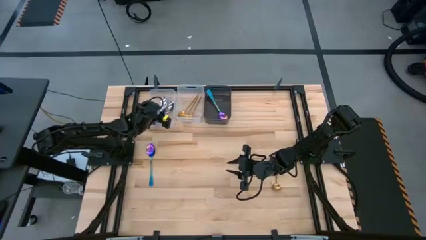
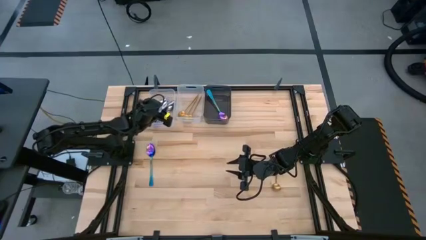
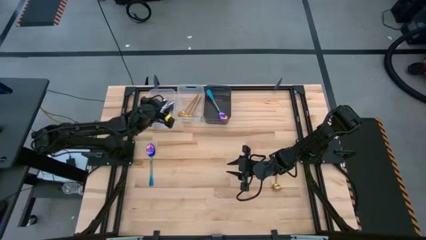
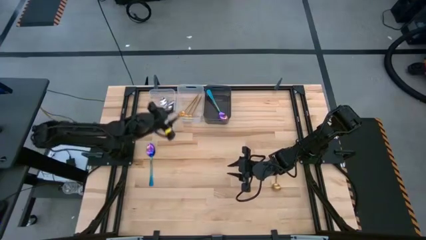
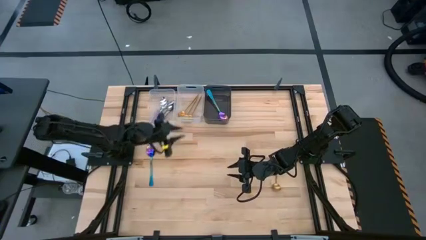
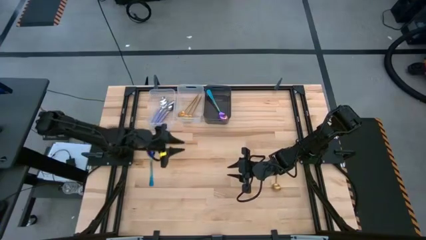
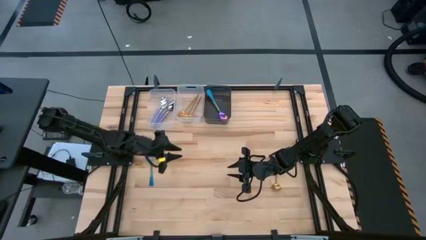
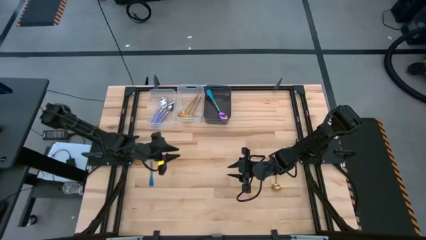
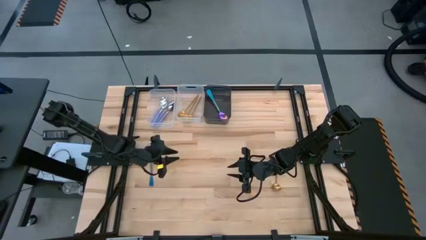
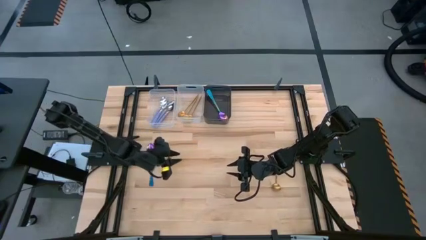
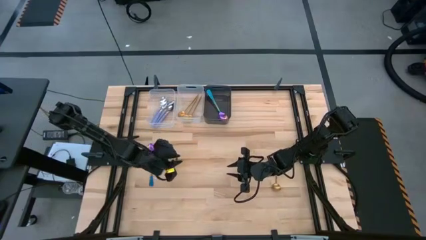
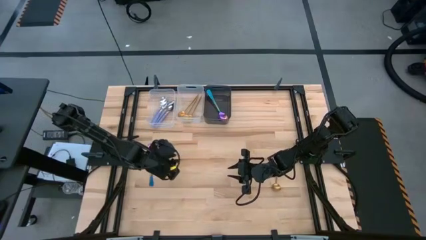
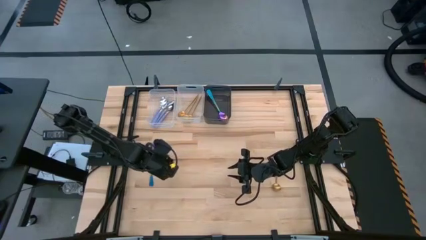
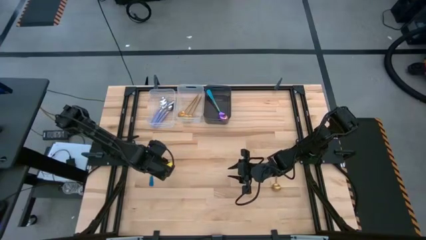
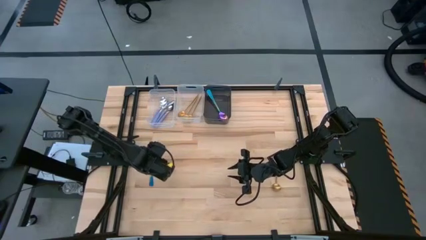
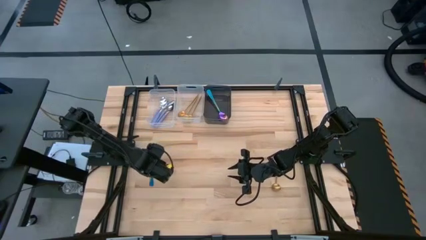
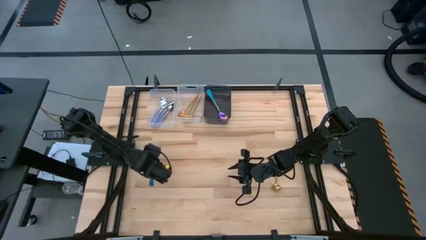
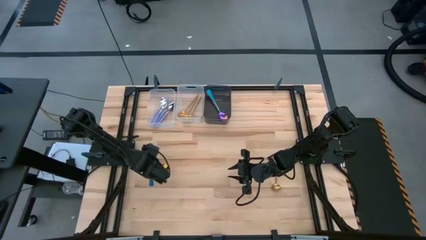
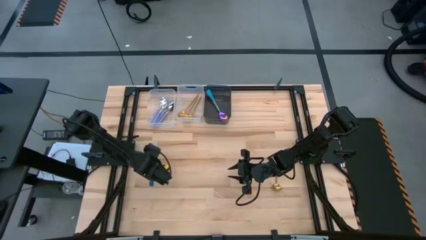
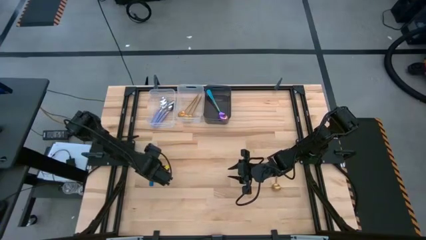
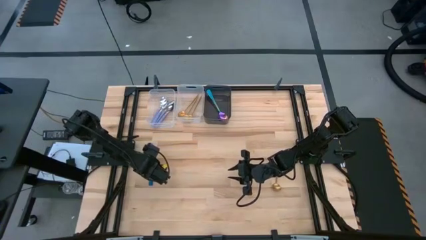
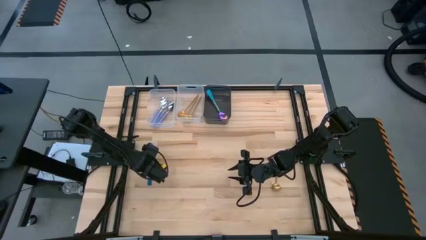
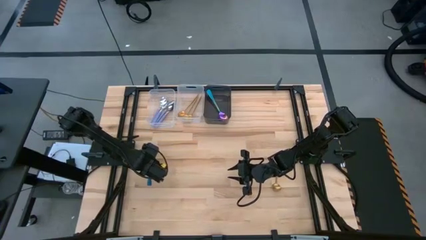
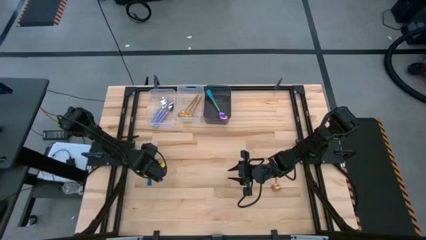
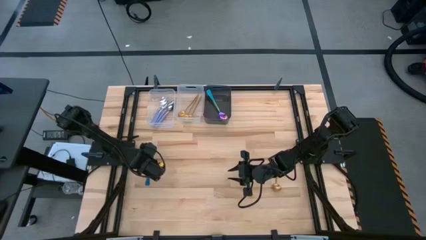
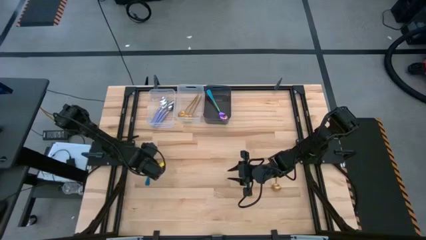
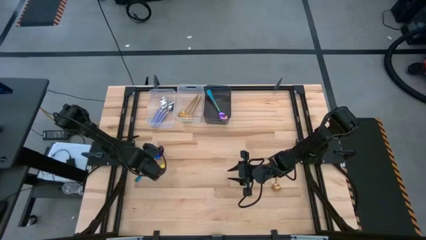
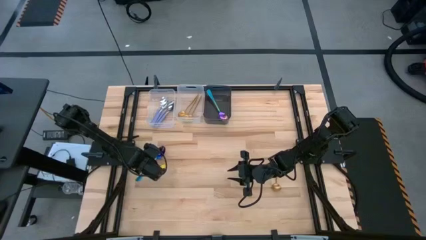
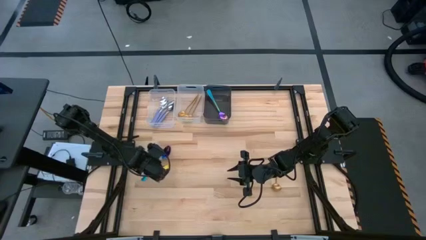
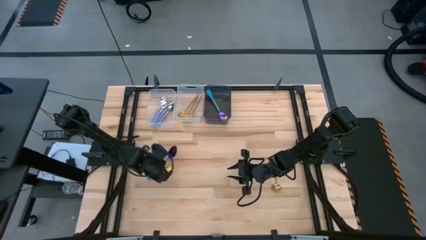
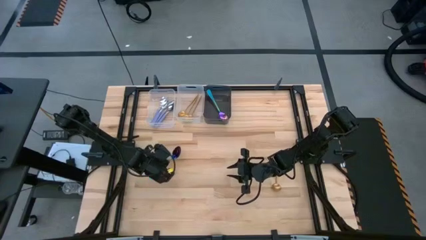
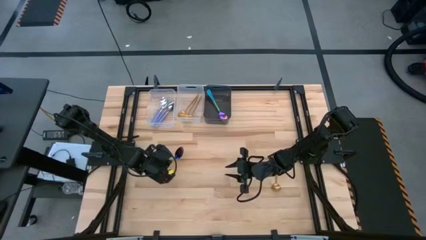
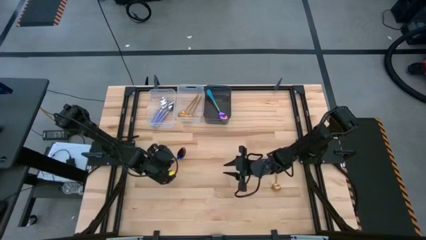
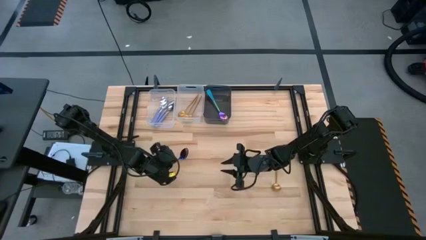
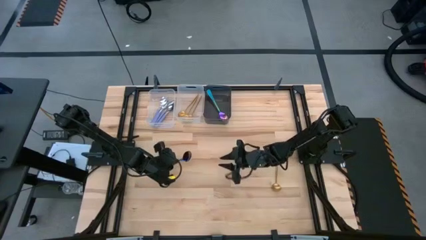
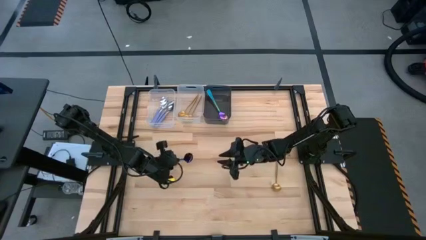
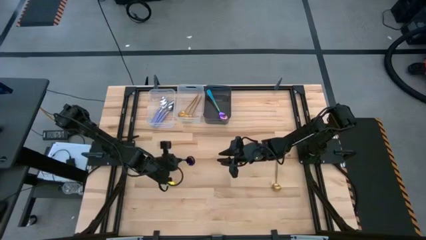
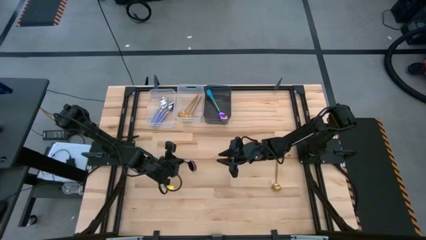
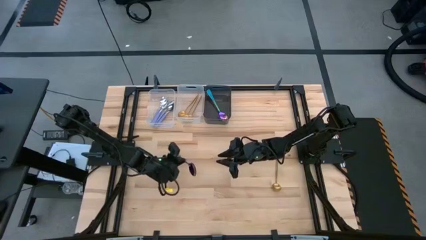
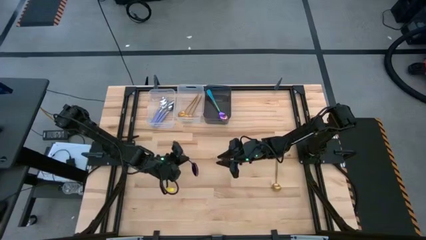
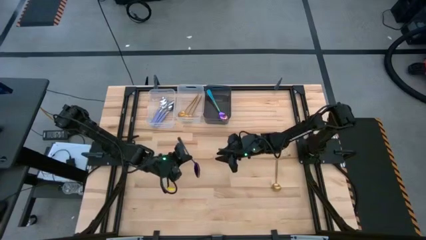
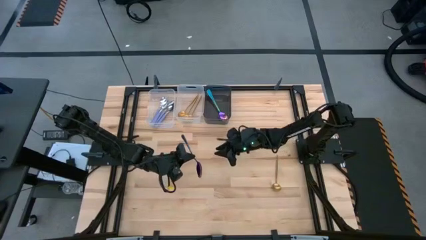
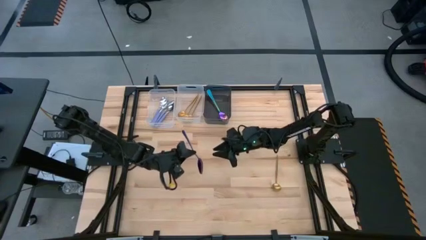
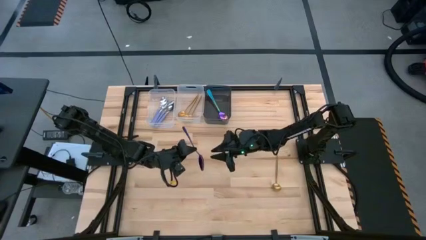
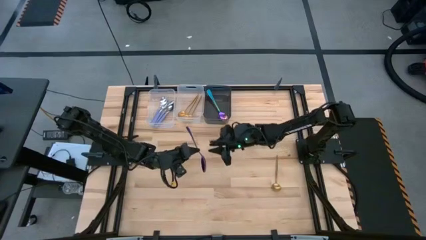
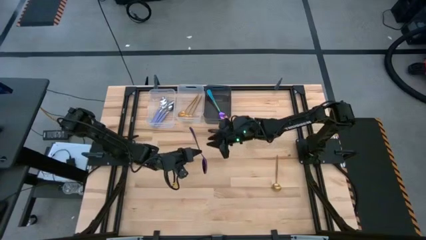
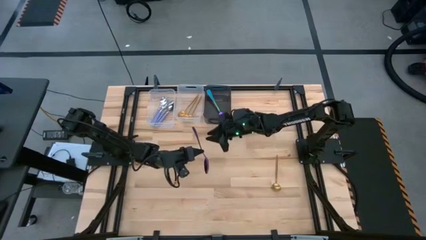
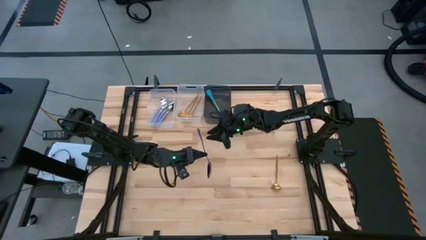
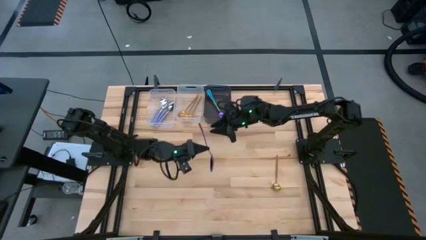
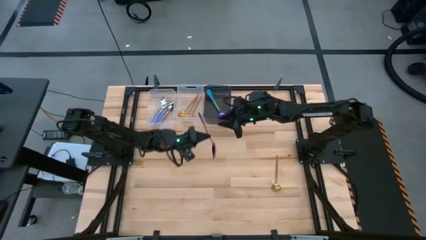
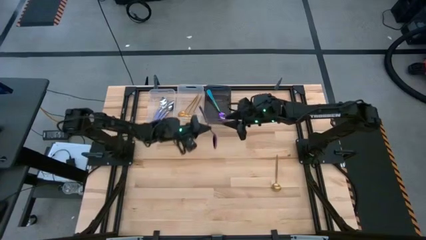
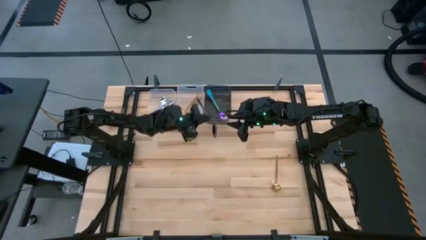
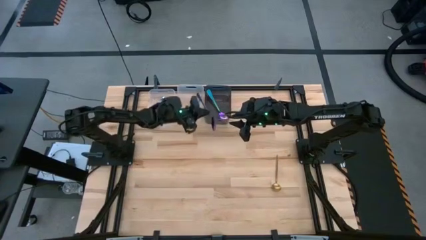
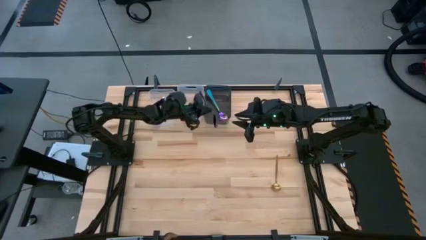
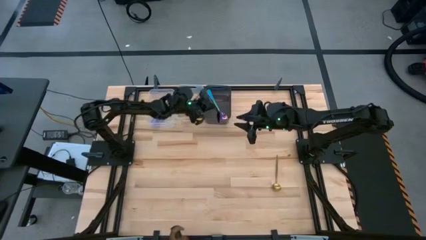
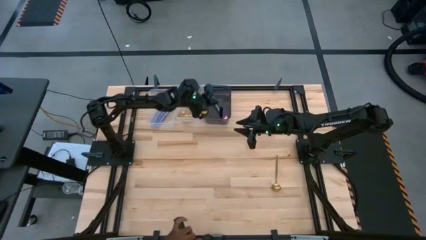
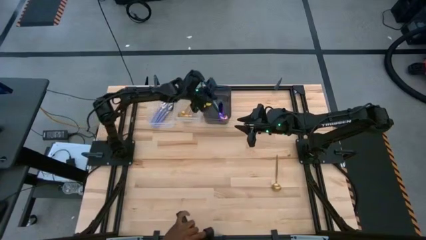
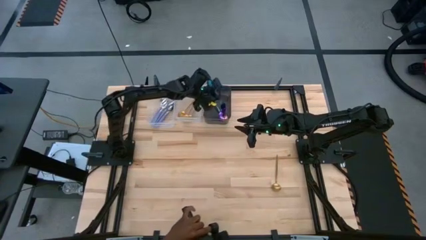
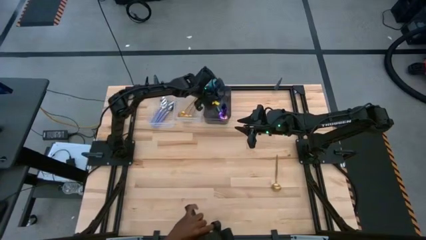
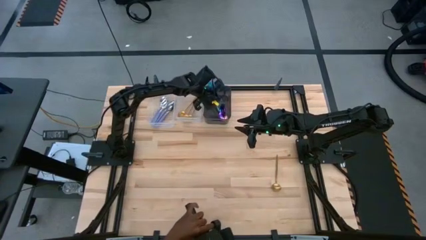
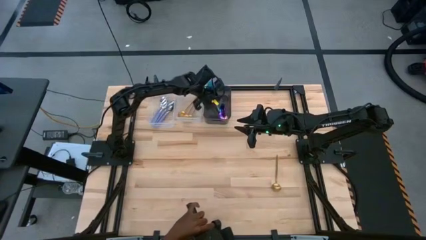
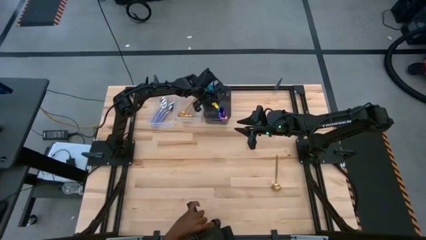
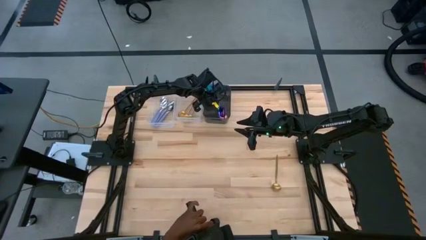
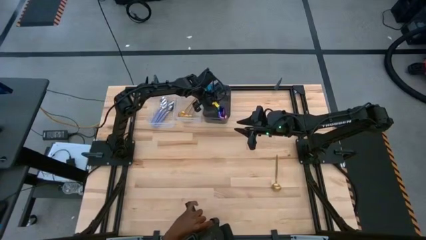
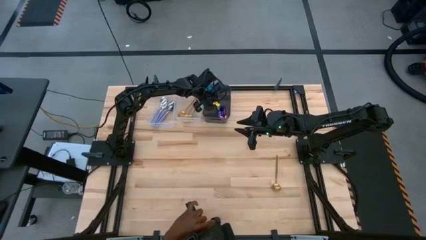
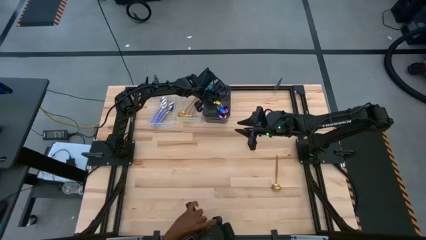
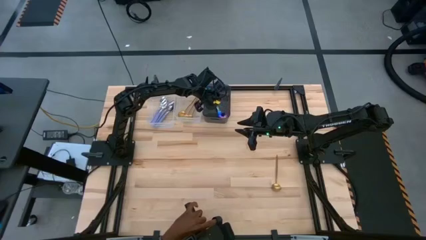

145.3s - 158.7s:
Task: Sort silverware by color (type)
Put the iridescent spoon into the black bin

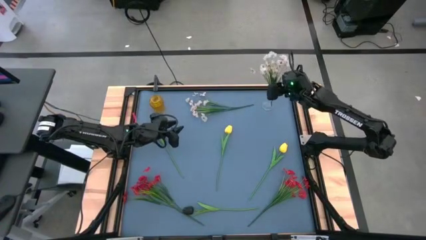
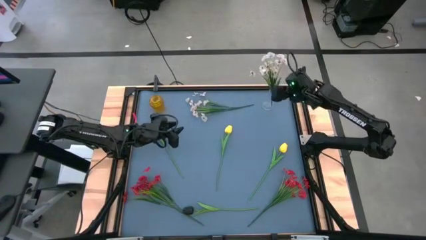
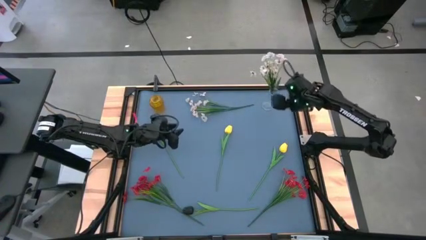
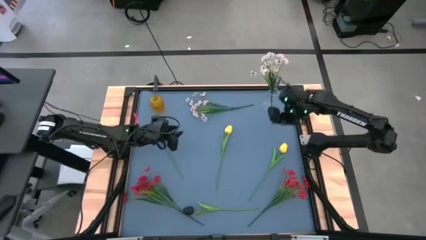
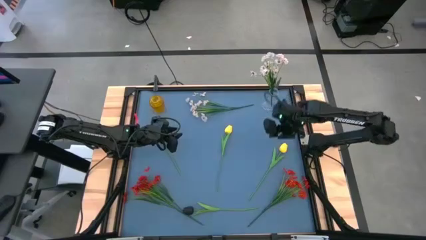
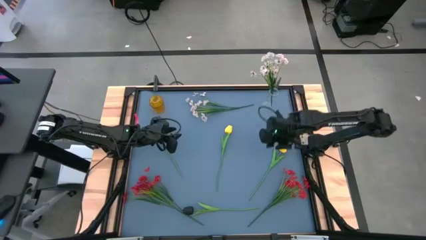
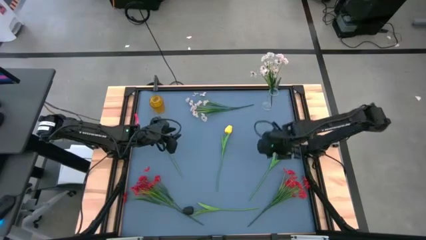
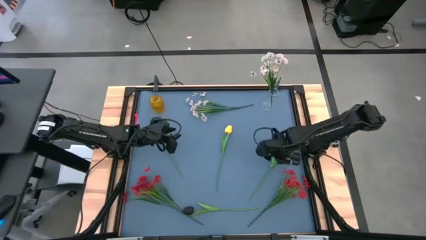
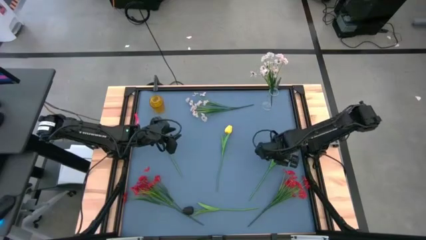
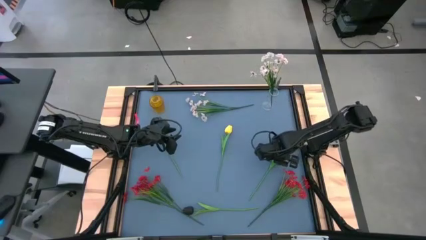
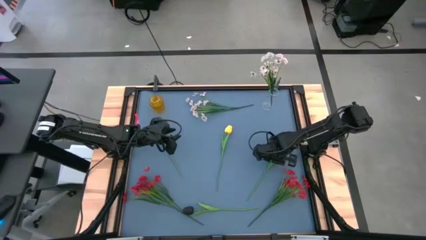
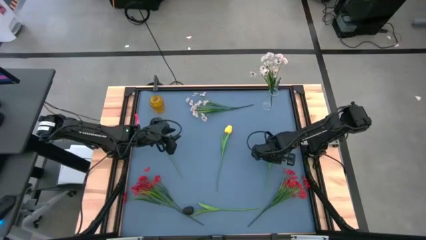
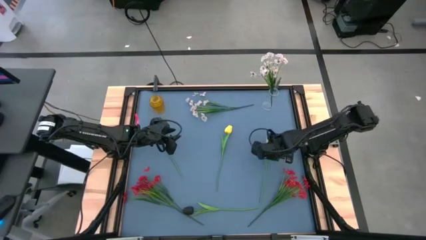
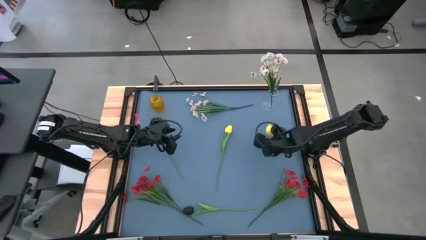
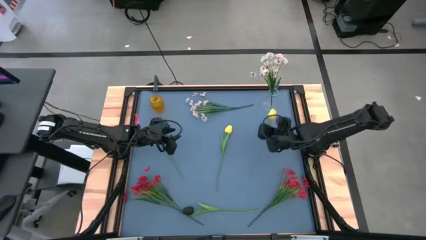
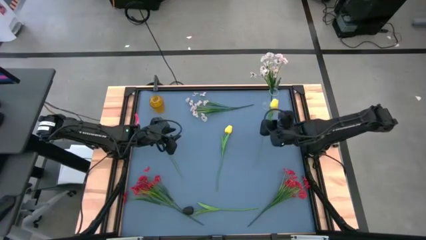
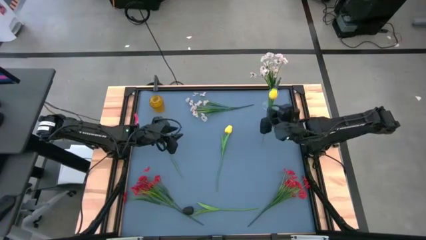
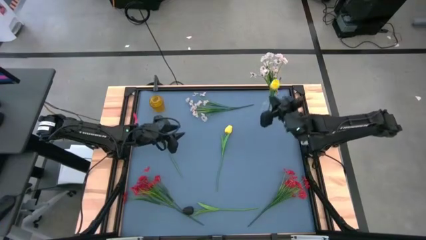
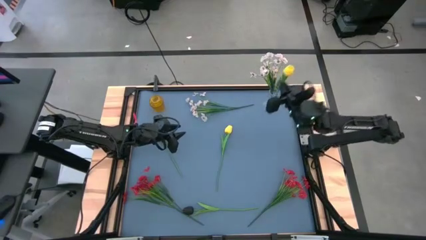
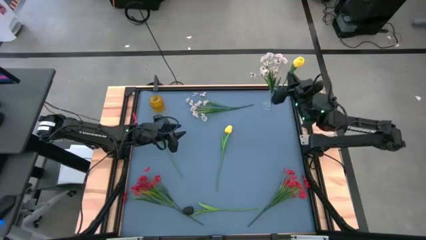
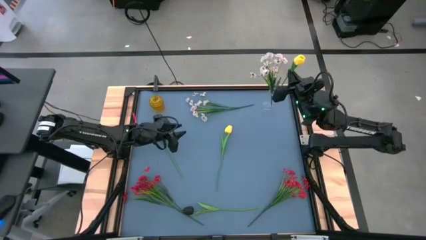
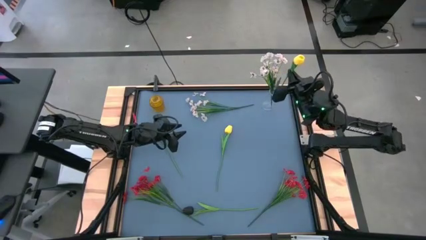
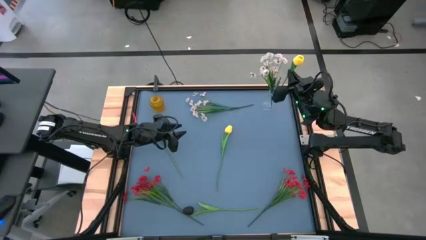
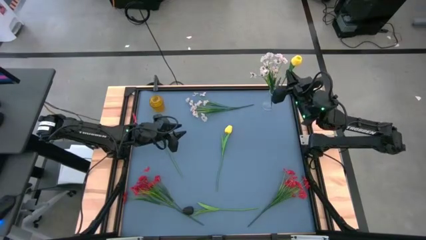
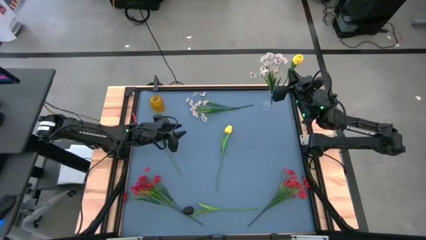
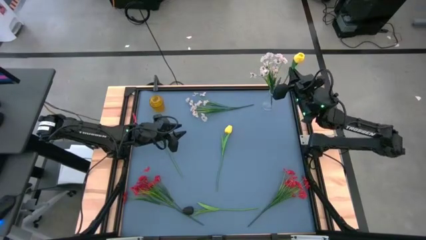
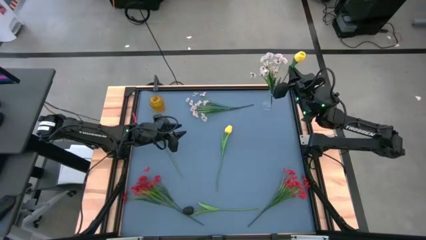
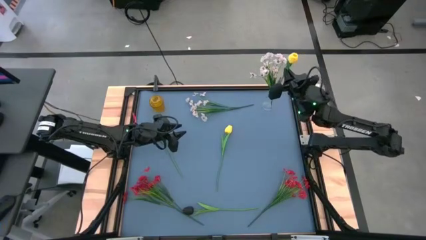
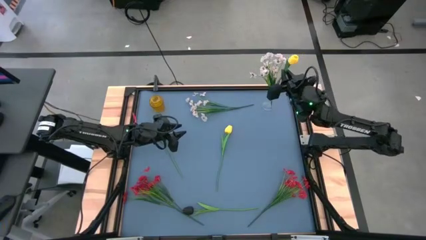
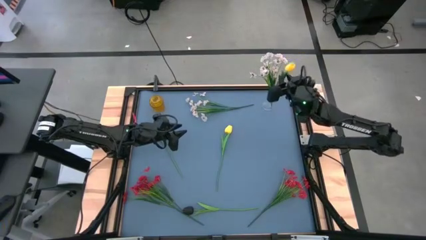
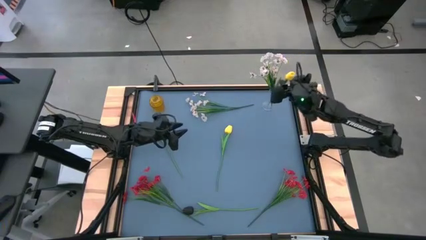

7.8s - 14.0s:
Task: Sort flowers into vase by color
Put the right yellow tulip into the transparent vase
